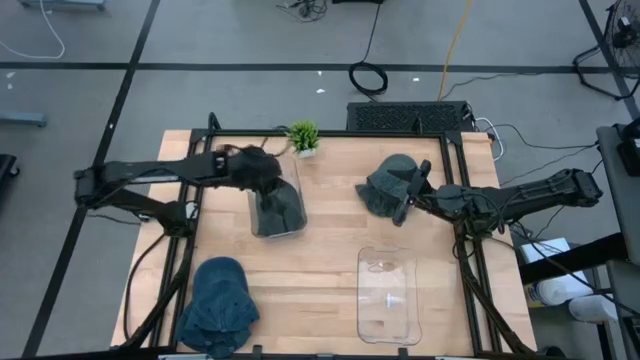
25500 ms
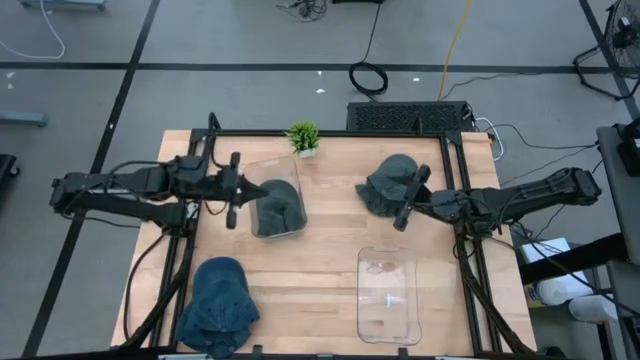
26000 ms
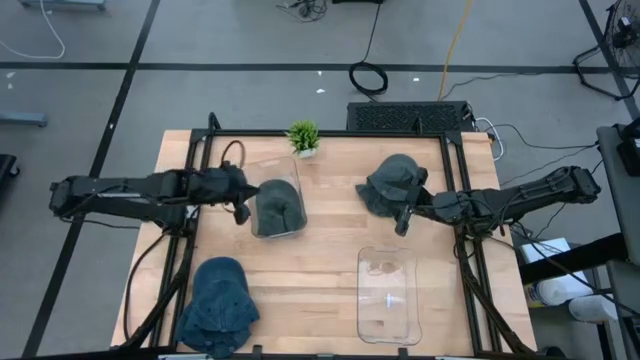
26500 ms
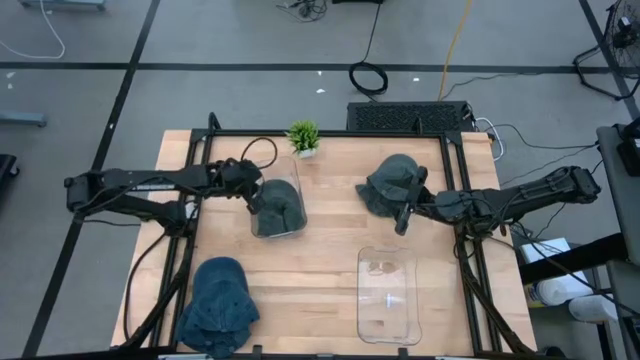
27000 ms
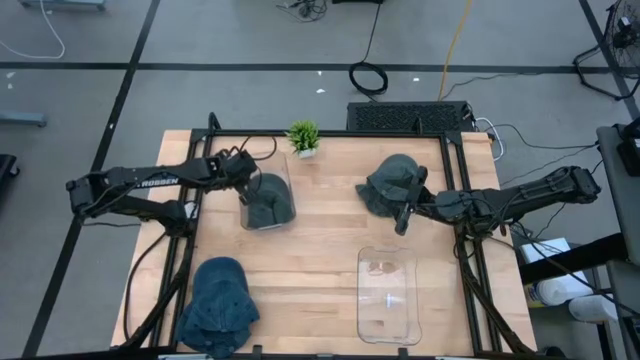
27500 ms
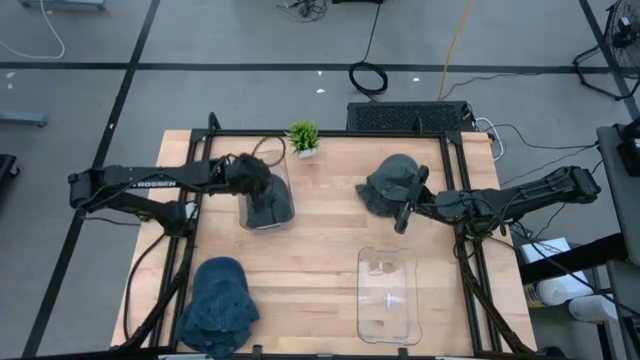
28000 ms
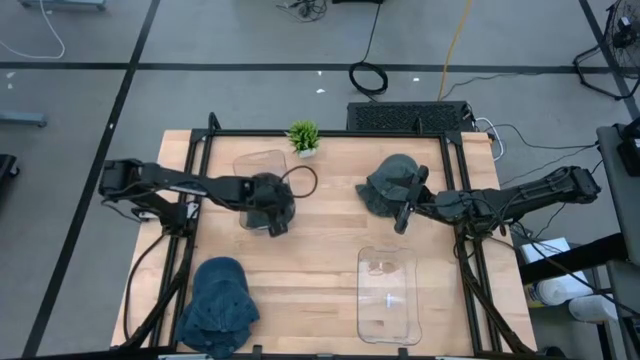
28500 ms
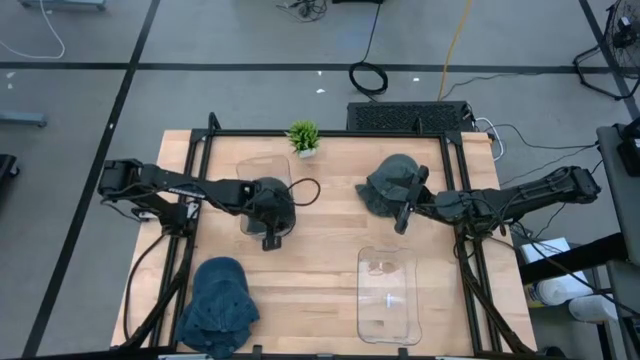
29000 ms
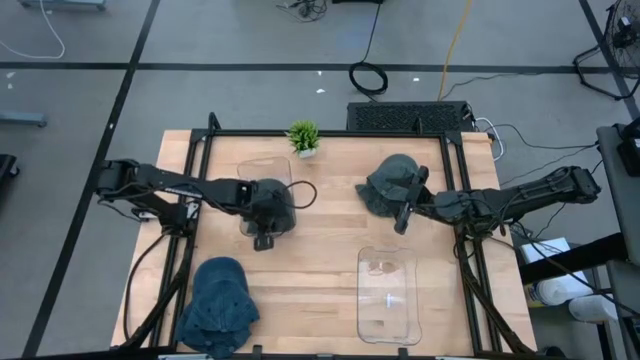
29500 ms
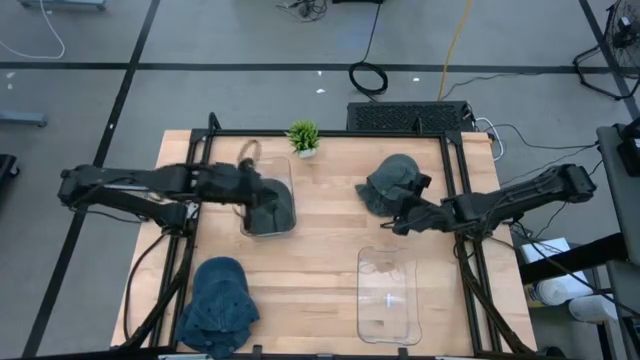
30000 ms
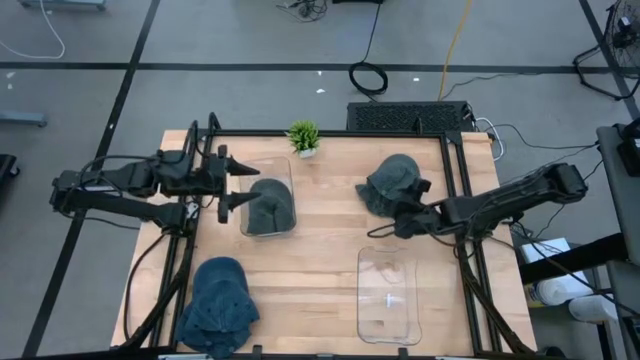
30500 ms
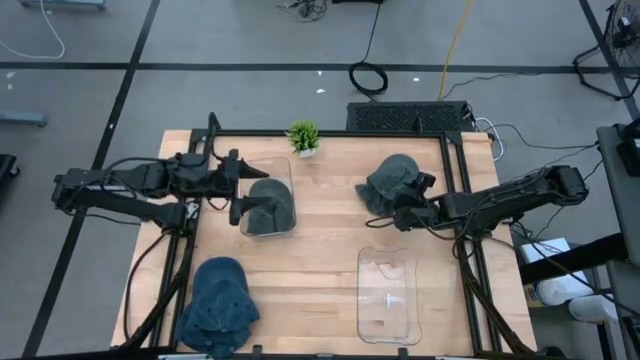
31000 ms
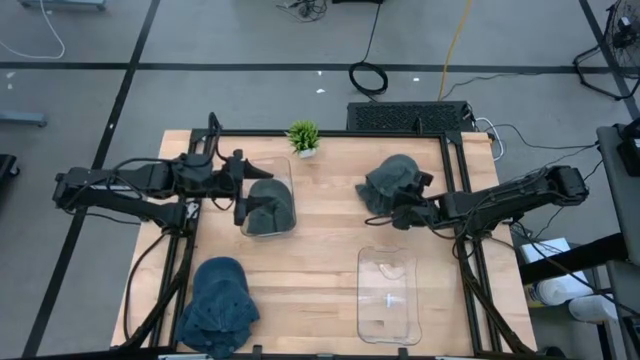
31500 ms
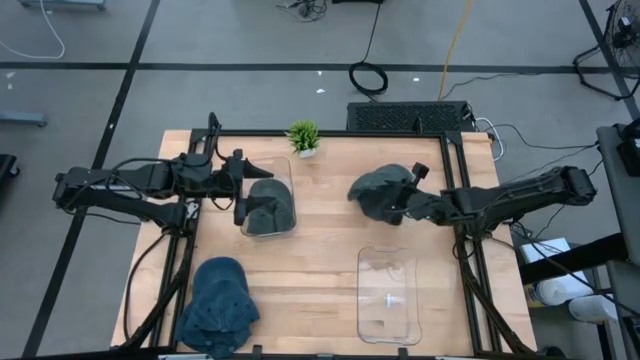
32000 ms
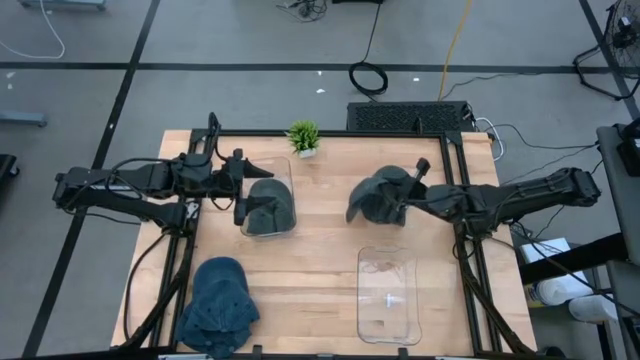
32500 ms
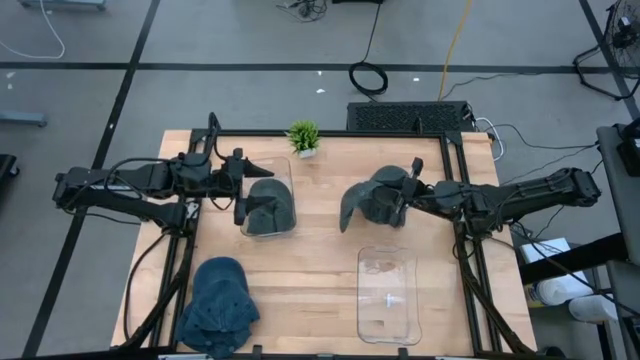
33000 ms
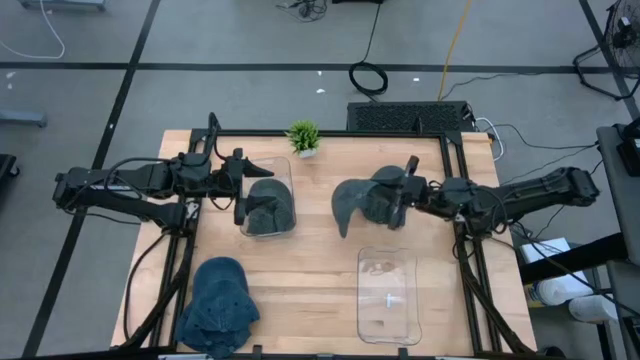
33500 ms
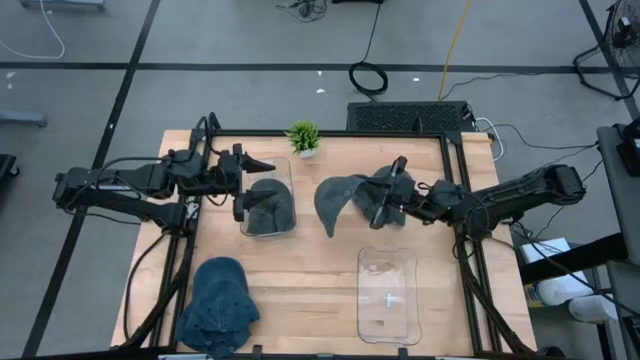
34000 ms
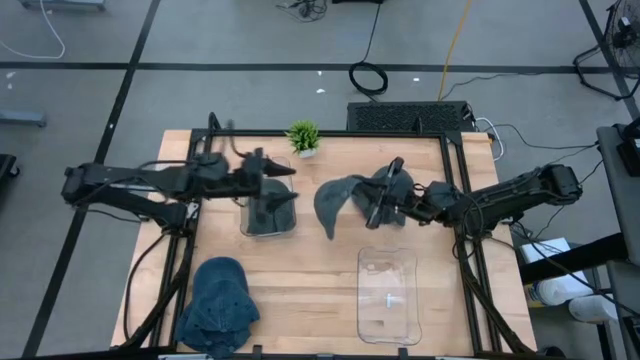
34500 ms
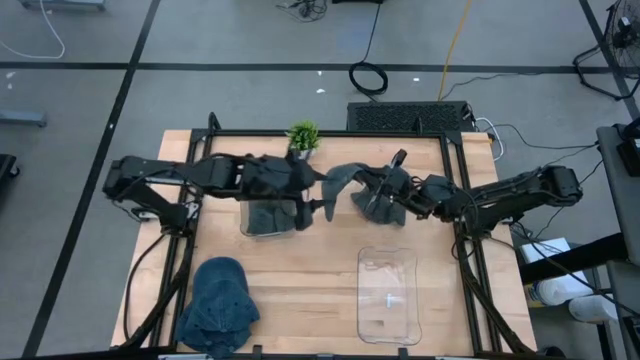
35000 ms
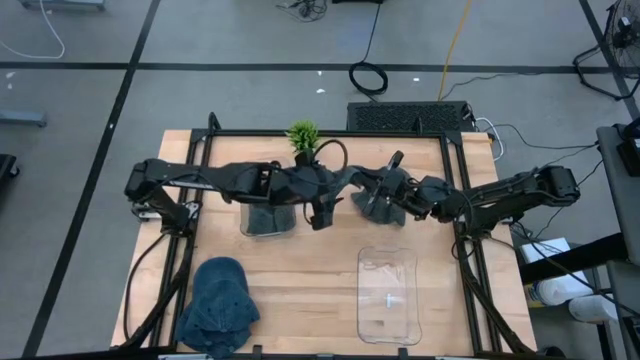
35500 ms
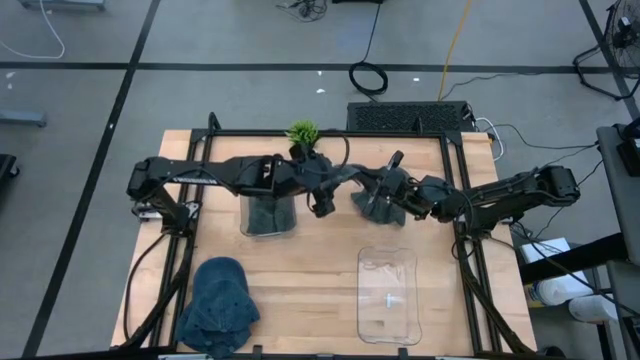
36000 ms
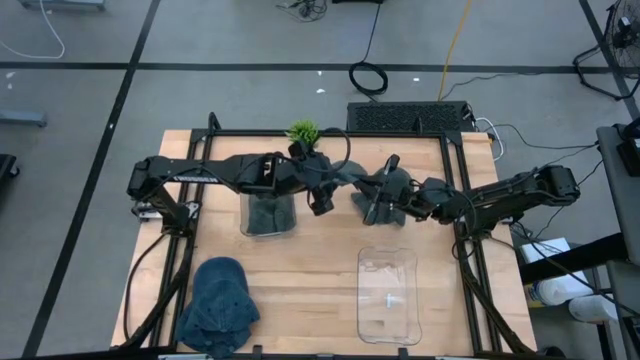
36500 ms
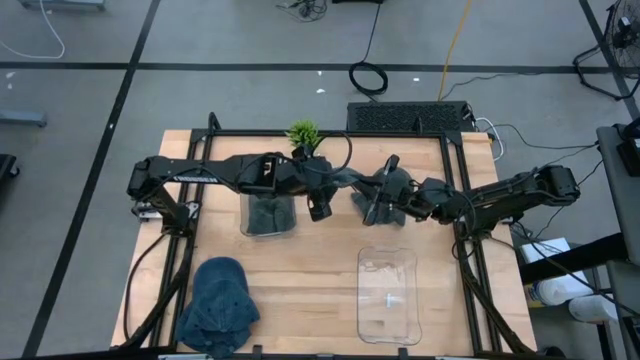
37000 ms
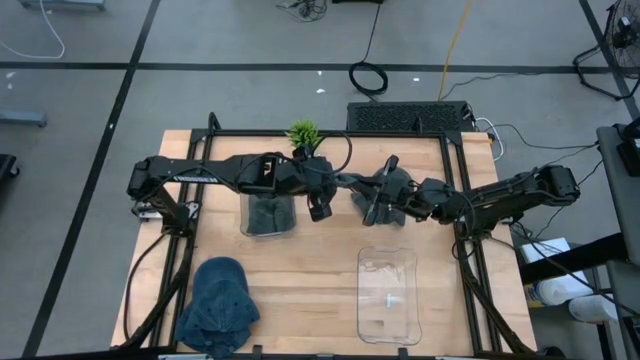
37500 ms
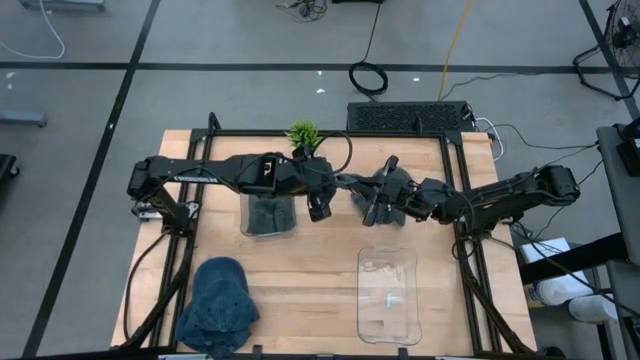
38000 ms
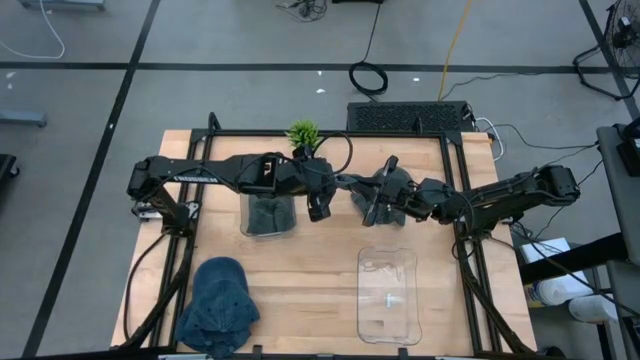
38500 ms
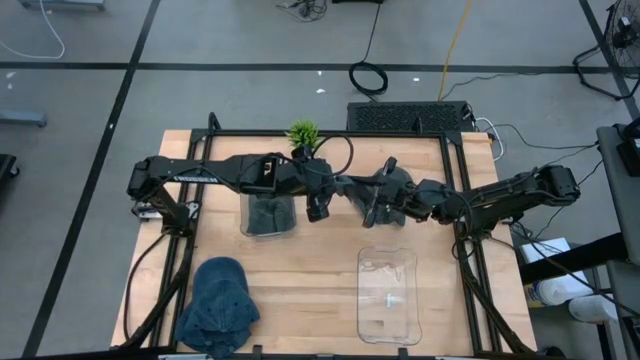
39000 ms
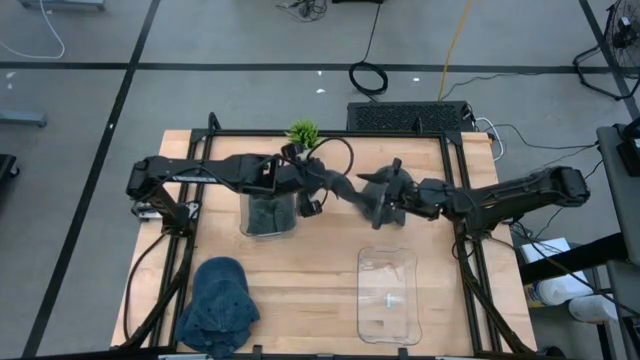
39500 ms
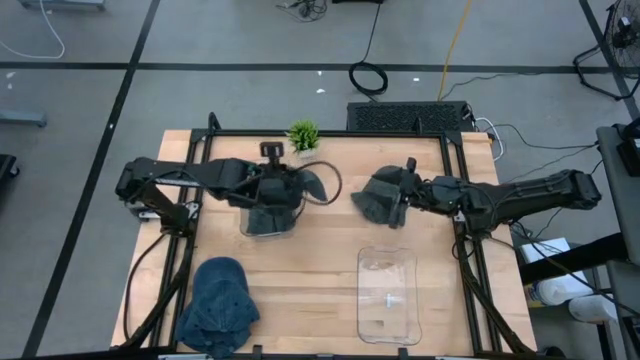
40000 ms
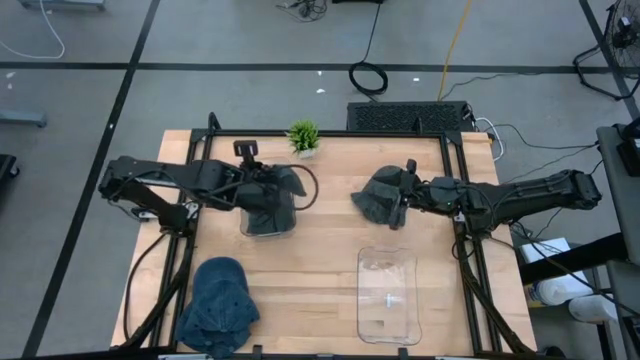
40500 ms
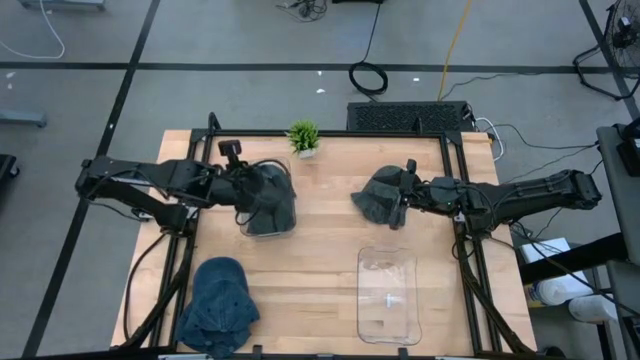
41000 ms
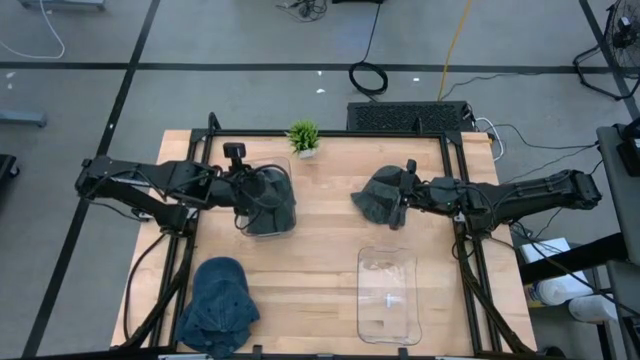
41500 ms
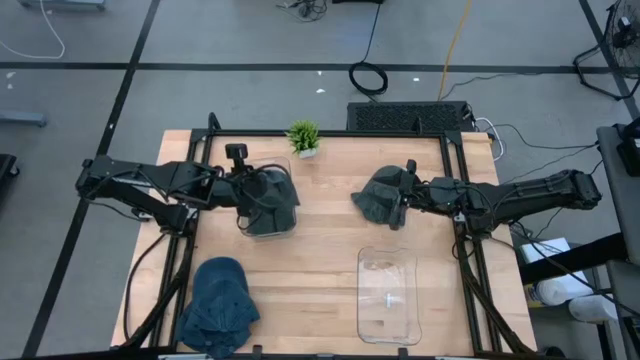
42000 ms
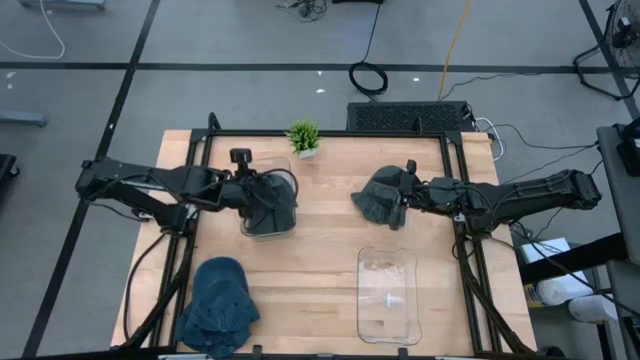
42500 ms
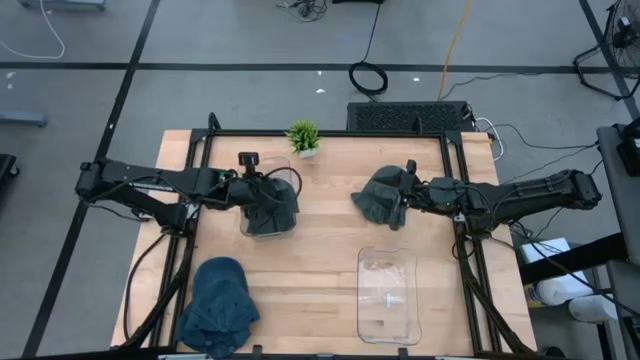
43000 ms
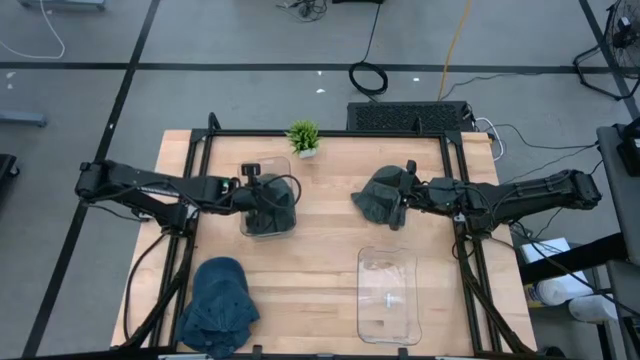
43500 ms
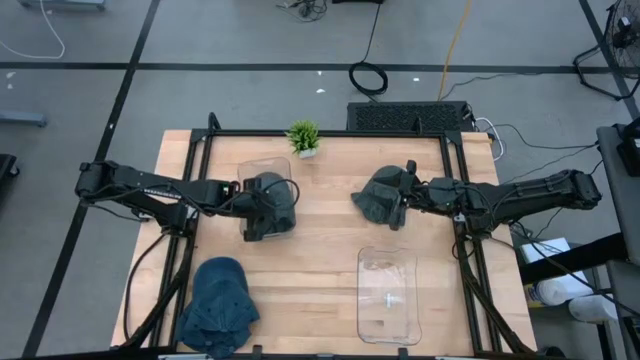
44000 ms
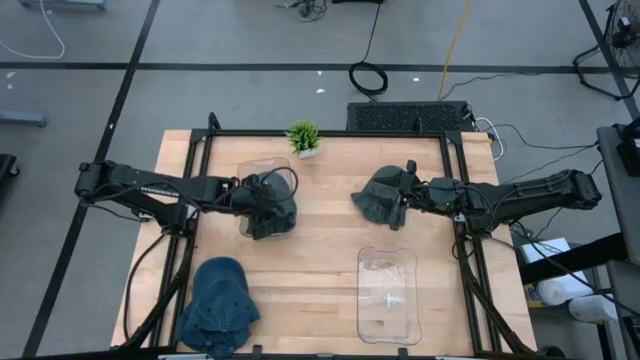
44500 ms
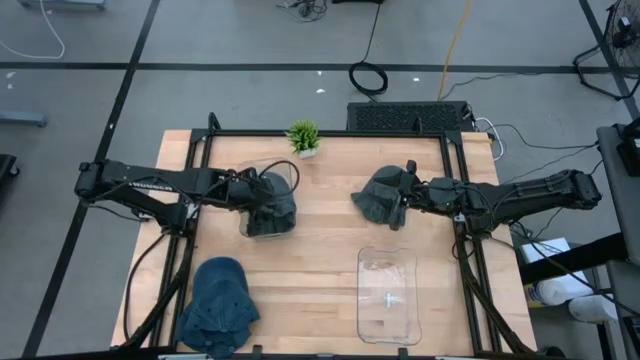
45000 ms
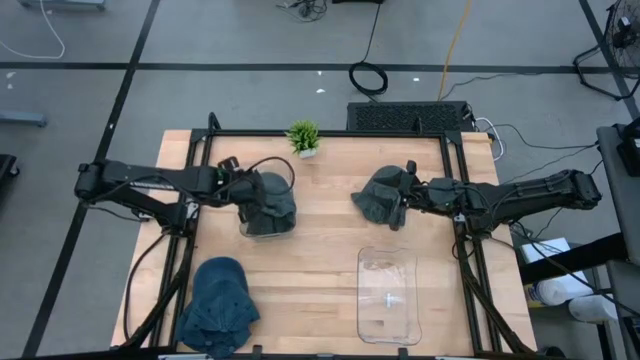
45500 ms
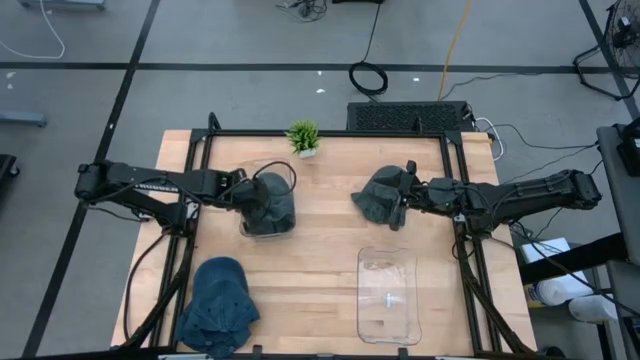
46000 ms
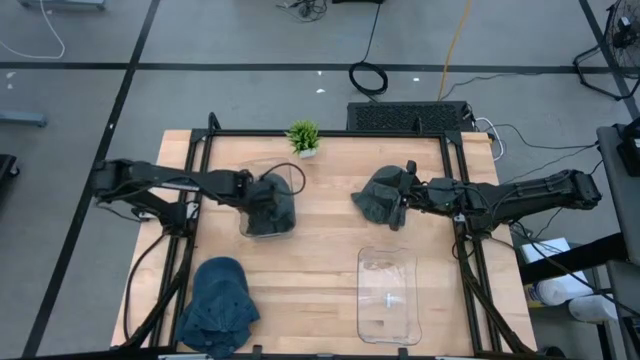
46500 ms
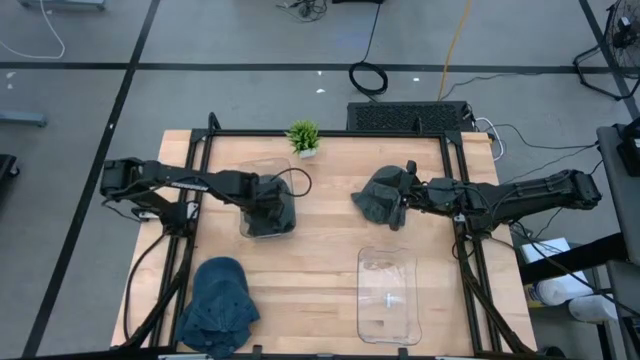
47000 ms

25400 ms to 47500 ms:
Task: Pick & Place hat
Put the black cap into the top transparent bin
